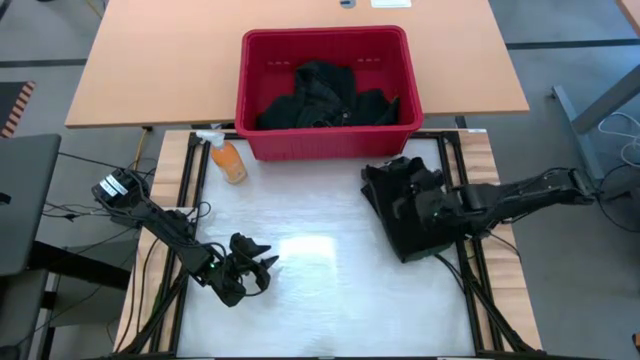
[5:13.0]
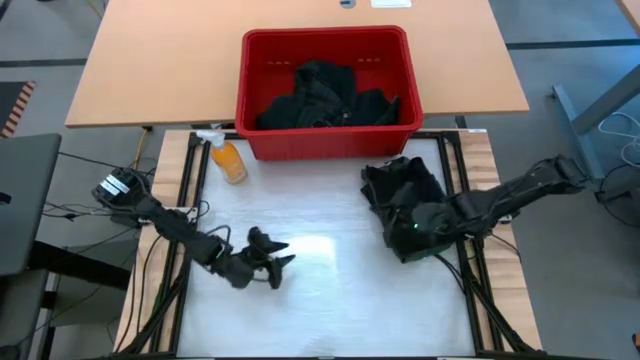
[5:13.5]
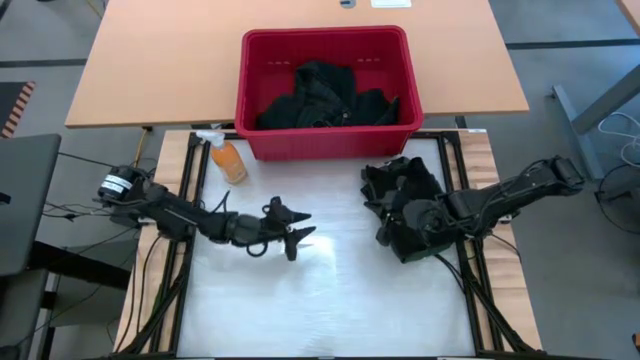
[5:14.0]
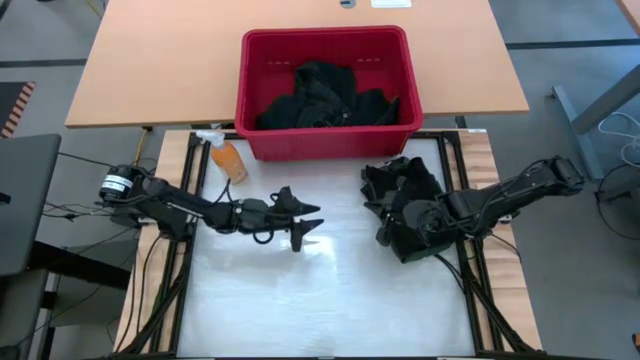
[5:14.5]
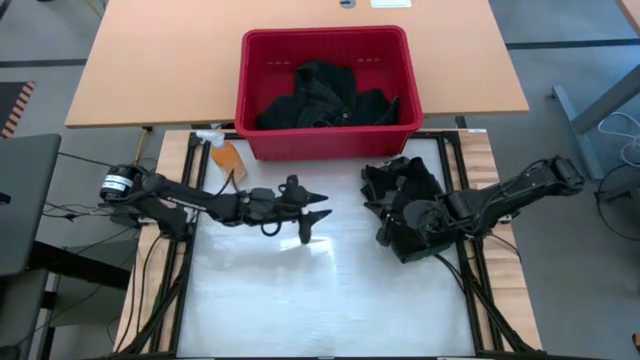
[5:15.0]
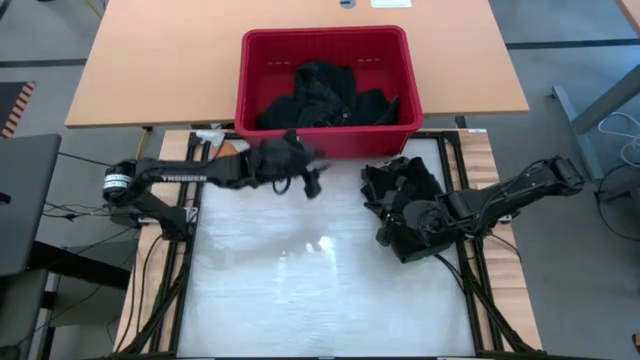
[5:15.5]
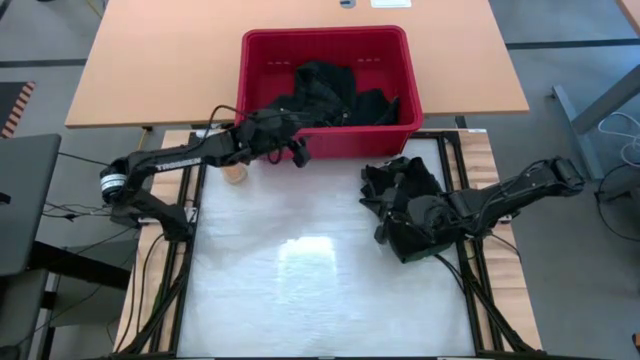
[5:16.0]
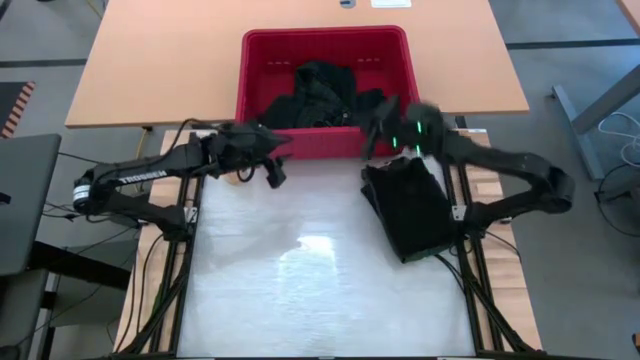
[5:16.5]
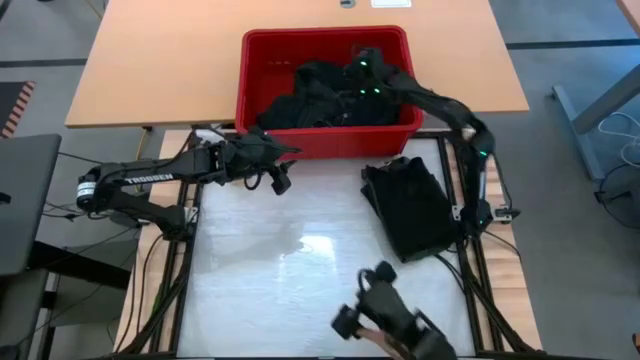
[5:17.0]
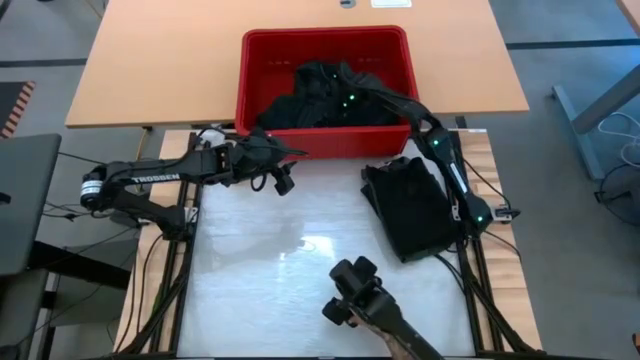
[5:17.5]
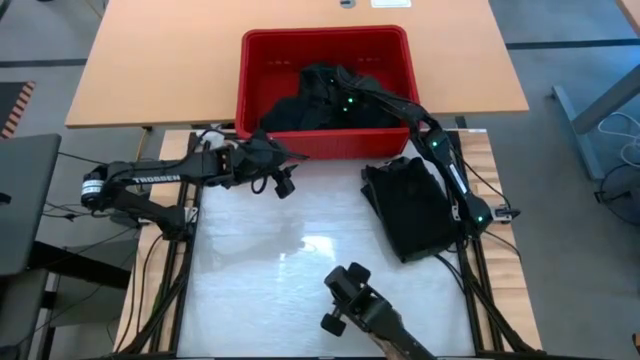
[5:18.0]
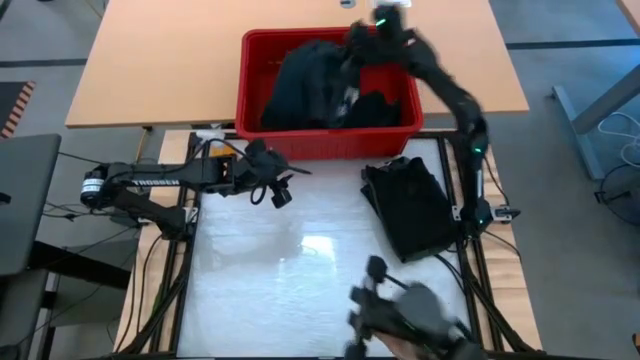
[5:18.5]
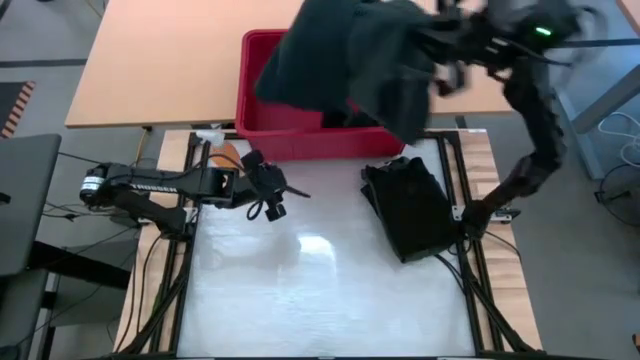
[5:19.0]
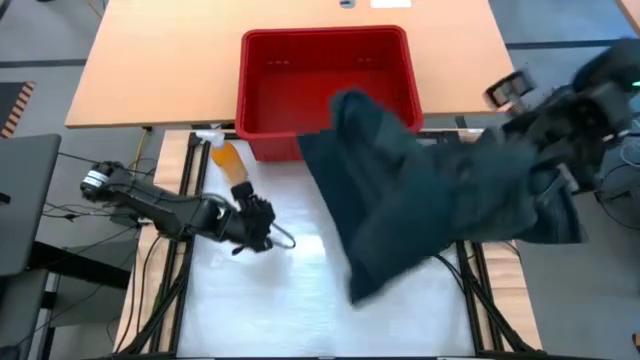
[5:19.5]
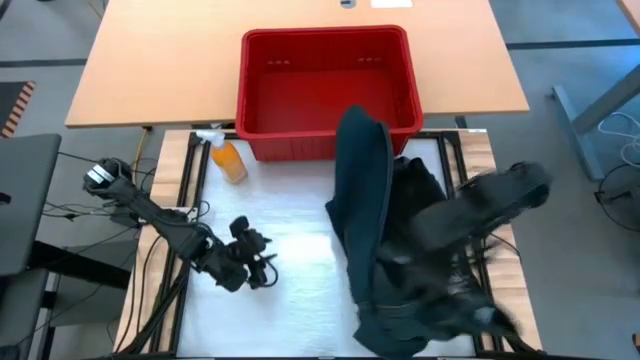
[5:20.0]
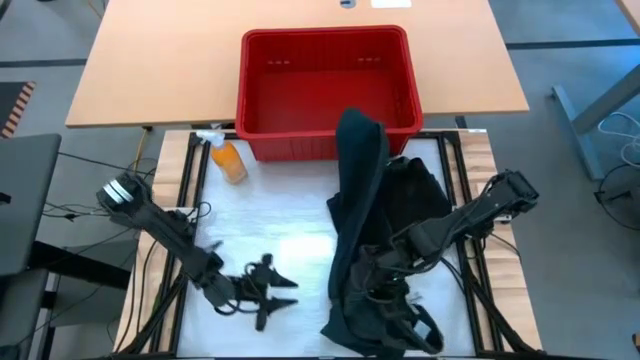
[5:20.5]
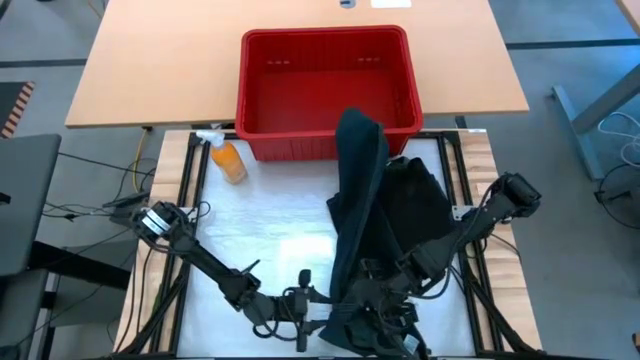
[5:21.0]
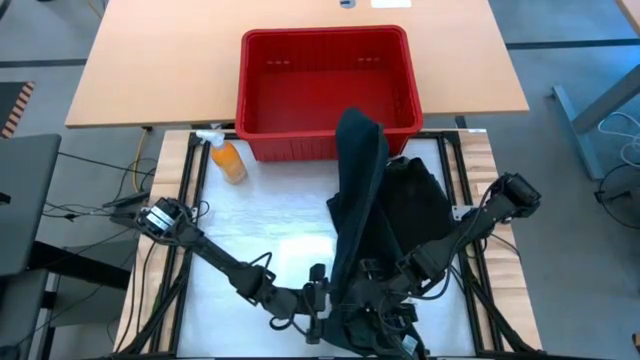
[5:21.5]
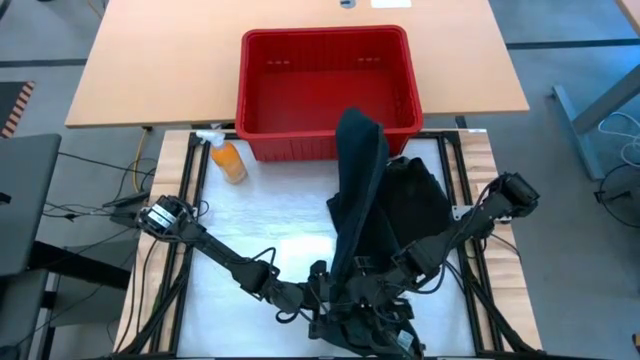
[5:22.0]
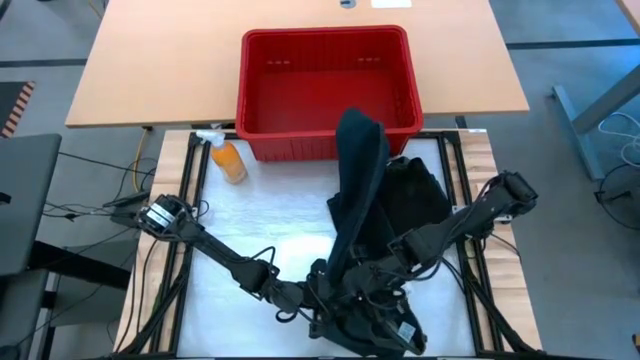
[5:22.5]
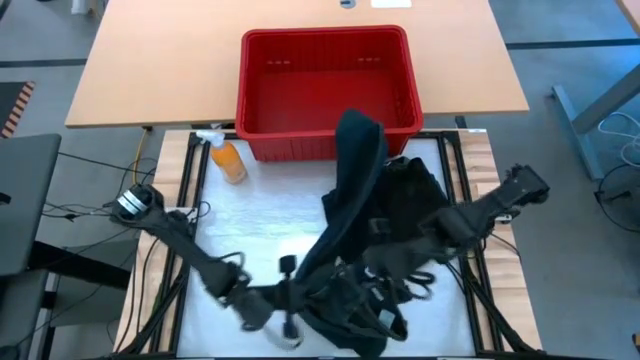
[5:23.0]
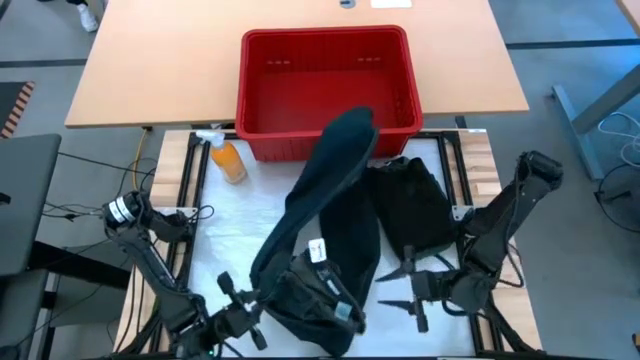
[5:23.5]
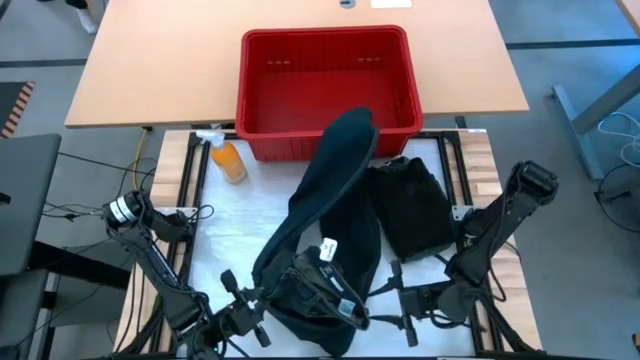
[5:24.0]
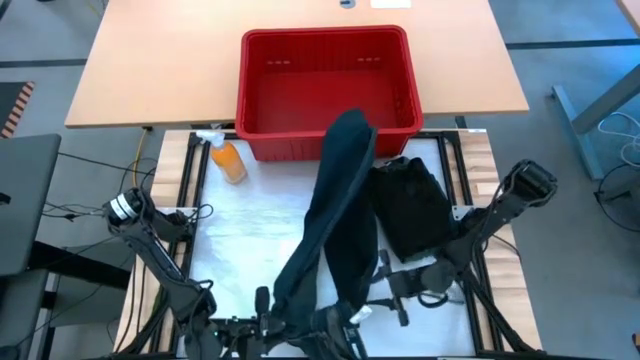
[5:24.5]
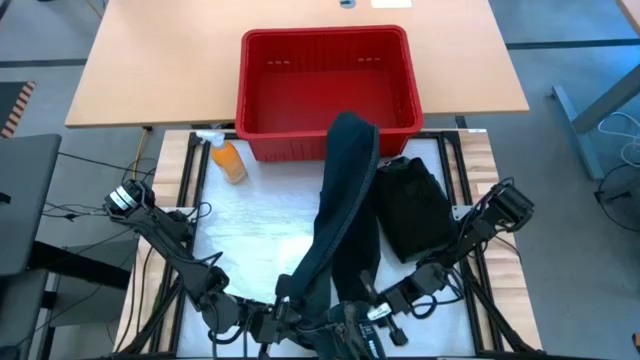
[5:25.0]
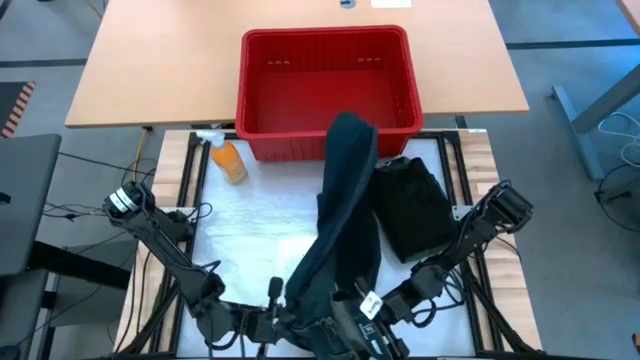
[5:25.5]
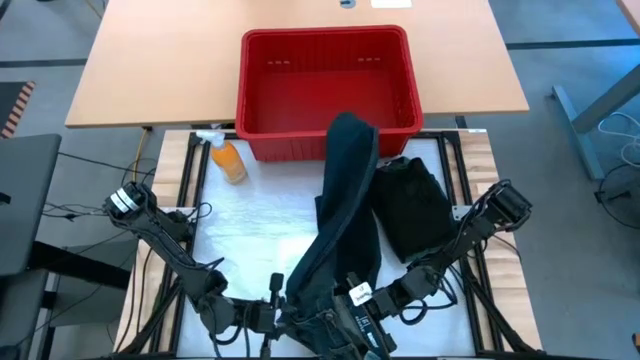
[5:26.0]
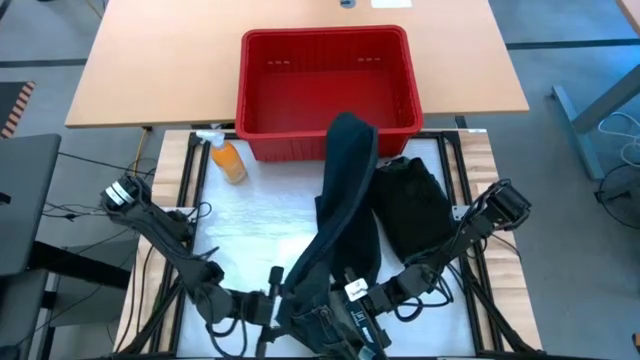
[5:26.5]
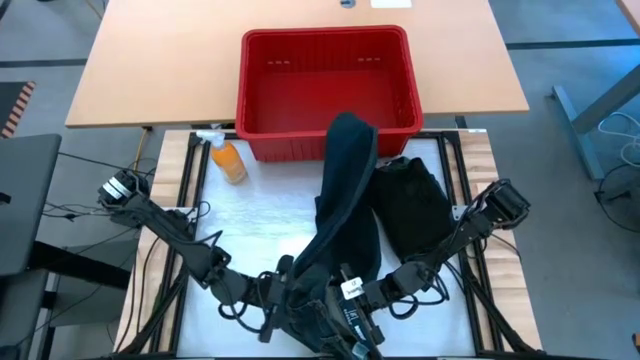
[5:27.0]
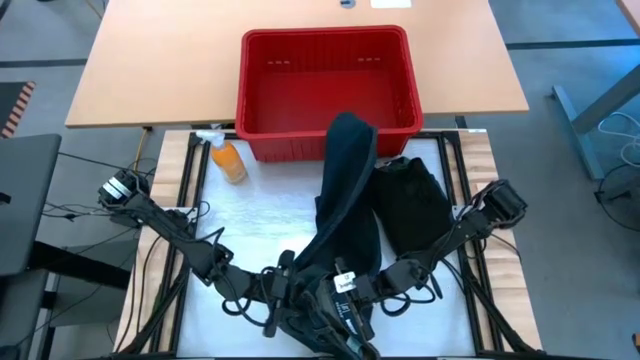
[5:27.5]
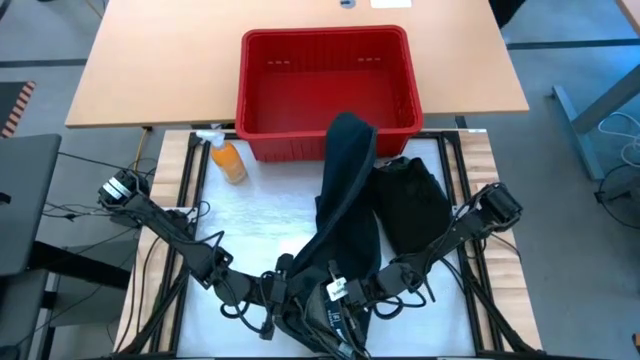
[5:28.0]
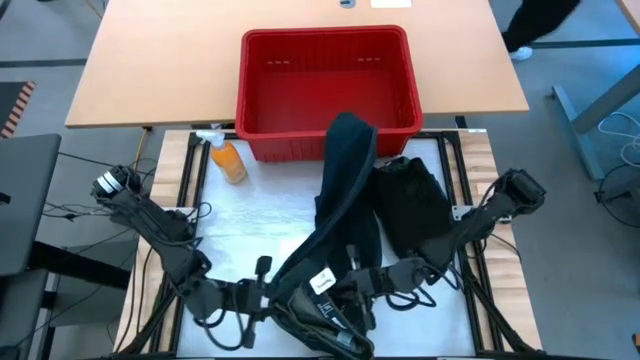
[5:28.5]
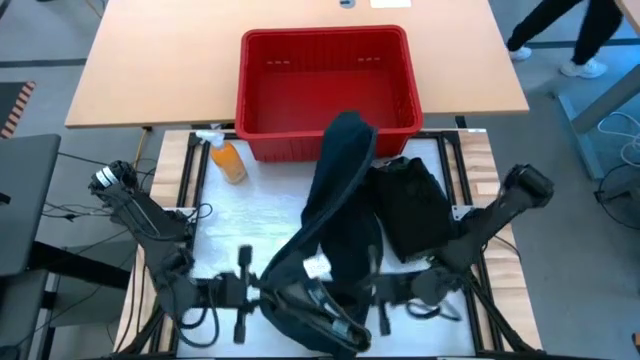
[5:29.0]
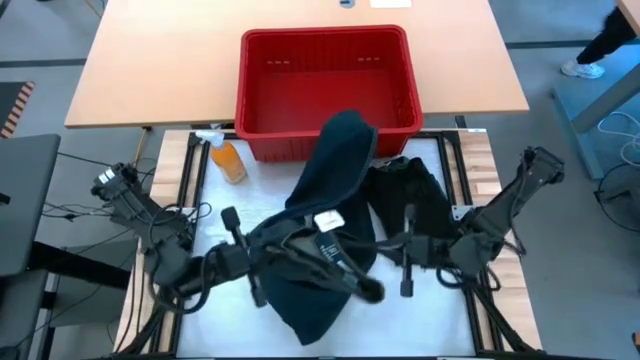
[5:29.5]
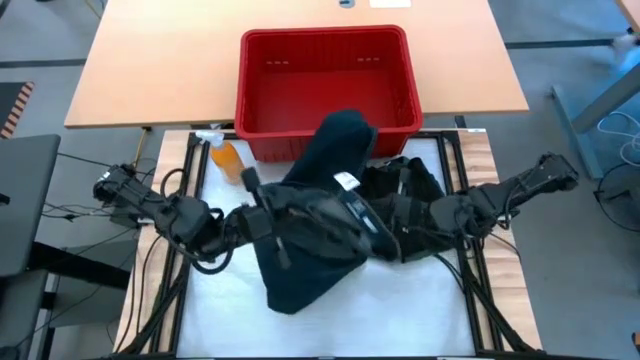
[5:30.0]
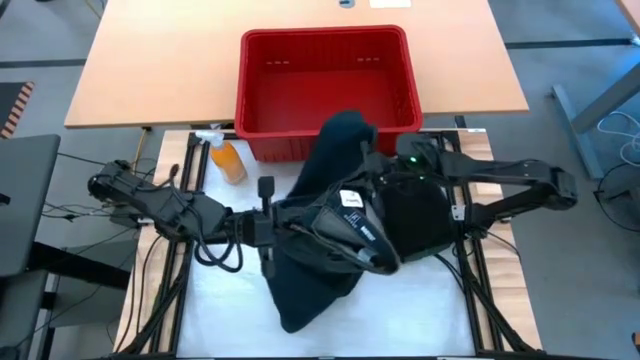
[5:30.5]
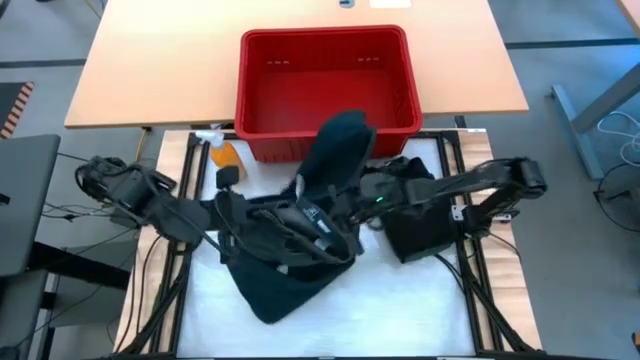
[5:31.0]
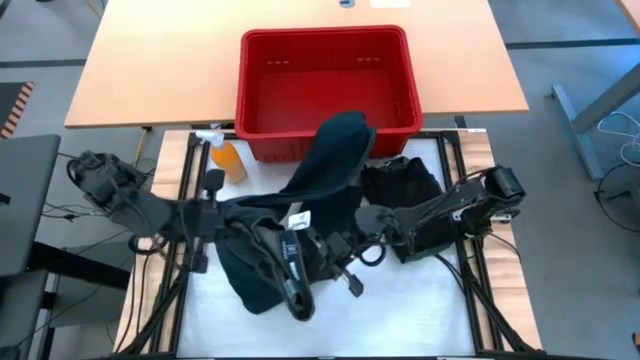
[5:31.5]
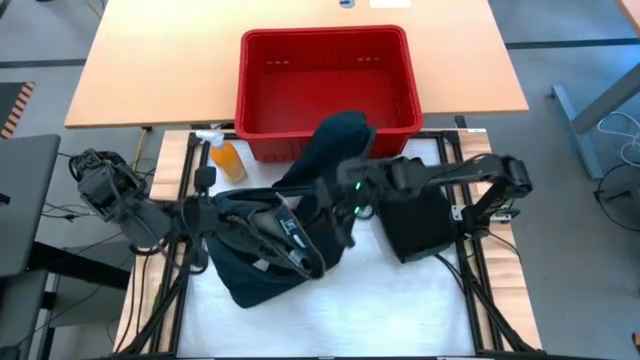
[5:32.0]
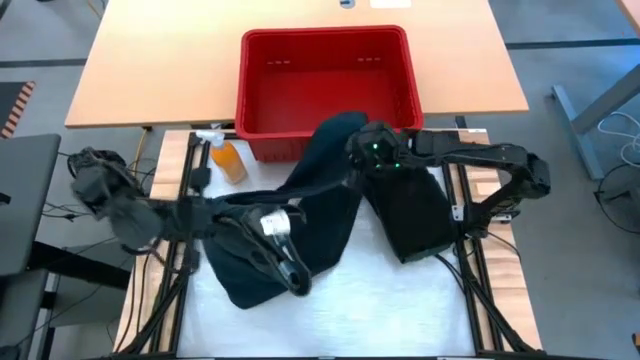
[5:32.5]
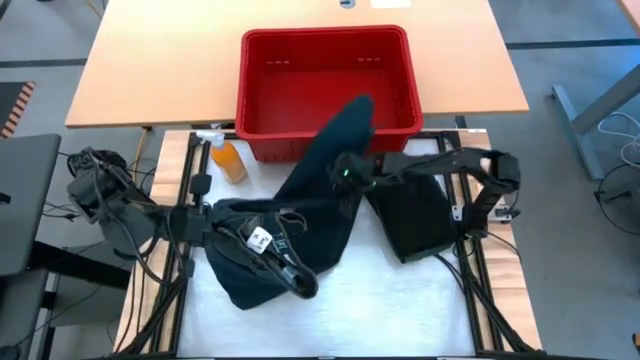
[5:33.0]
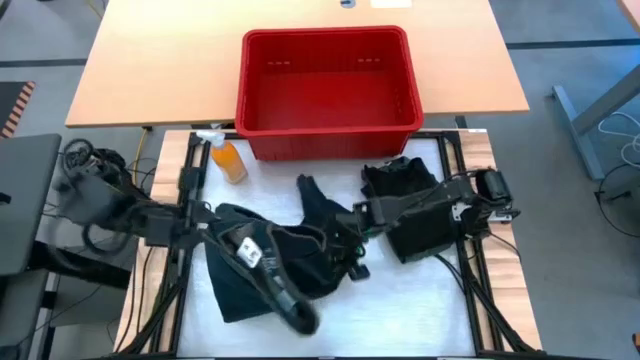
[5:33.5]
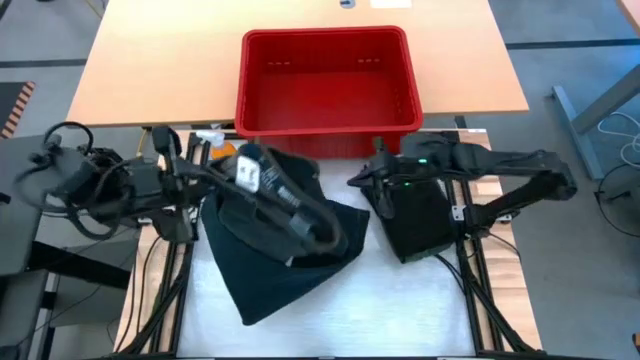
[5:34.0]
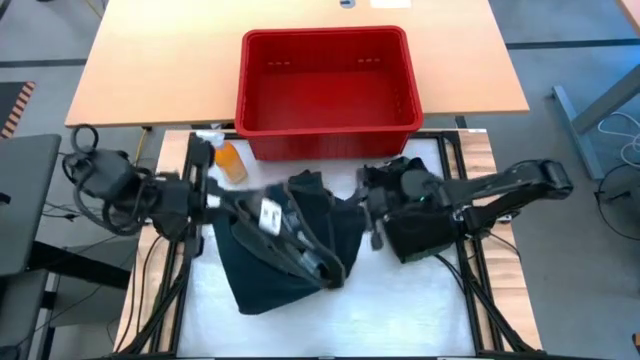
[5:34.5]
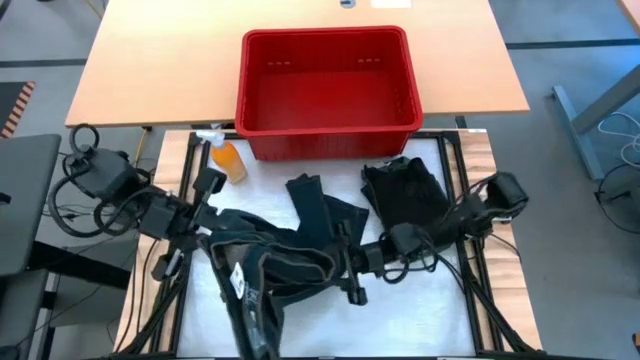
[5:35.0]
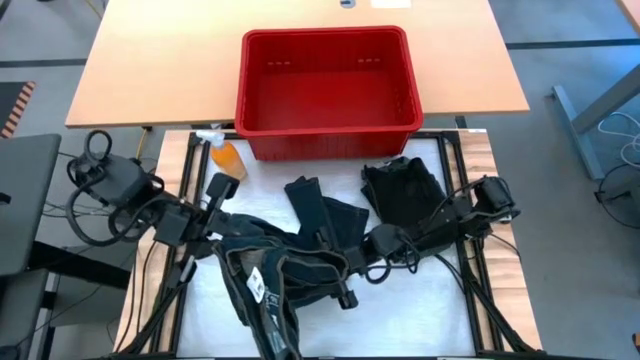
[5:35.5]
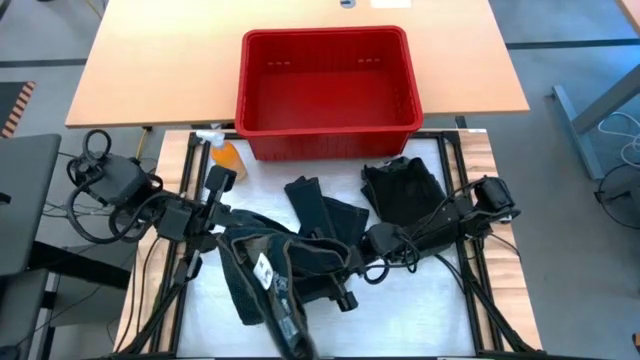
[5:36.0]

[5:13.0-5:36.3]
Task: Fold laundry
Fold the dark blue jeans
